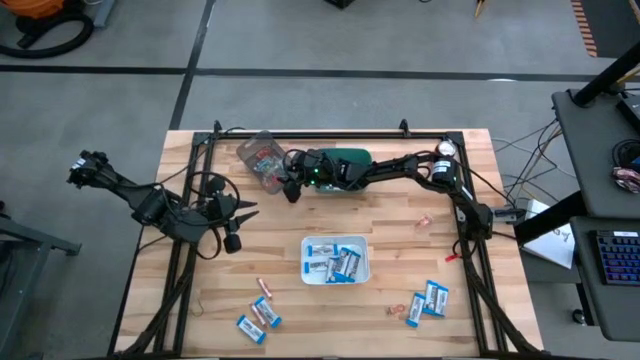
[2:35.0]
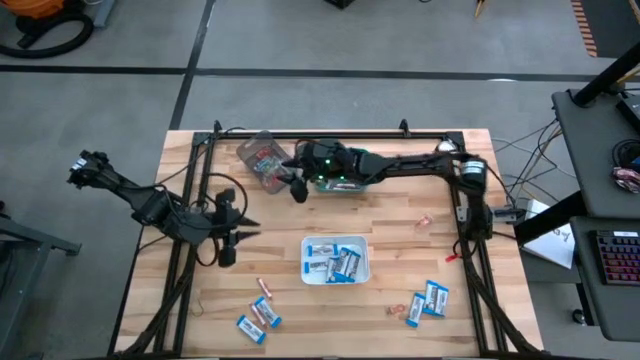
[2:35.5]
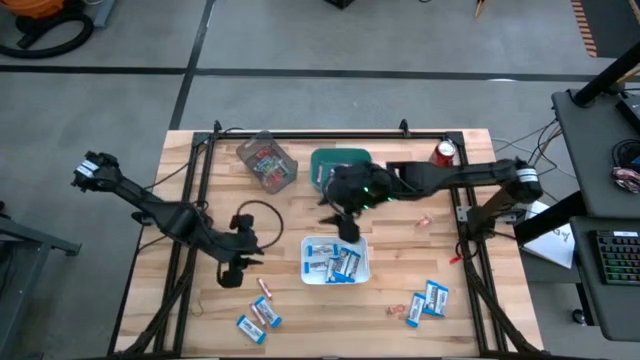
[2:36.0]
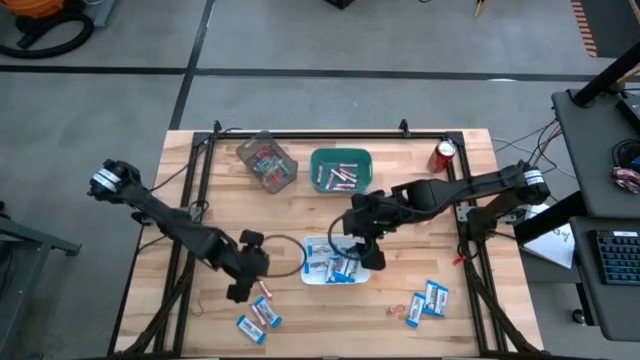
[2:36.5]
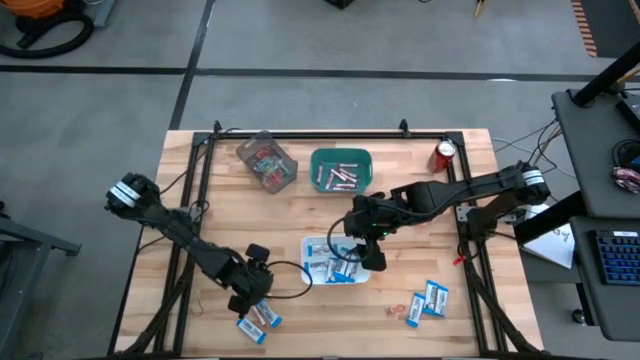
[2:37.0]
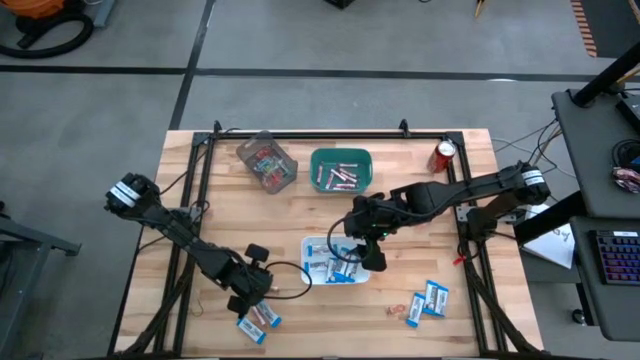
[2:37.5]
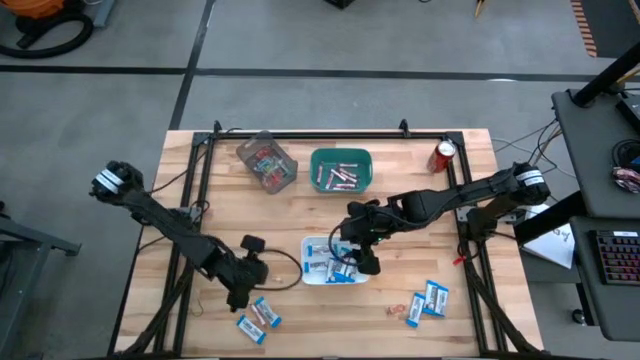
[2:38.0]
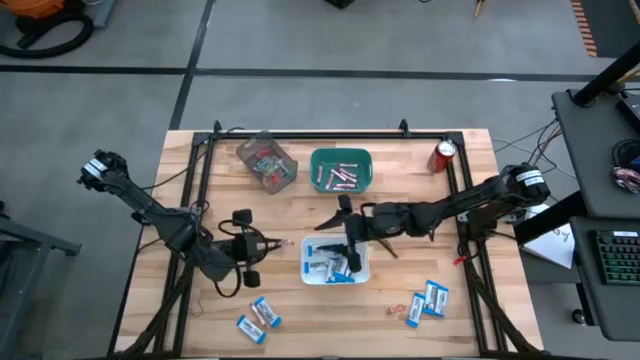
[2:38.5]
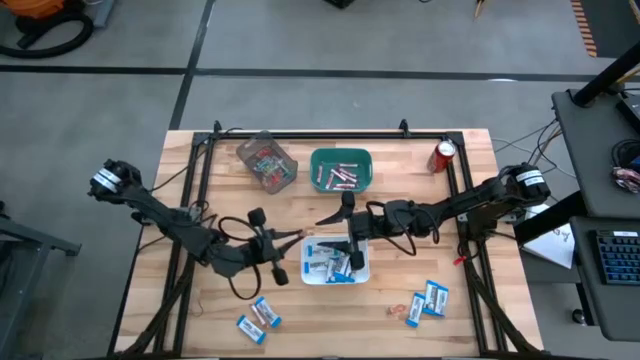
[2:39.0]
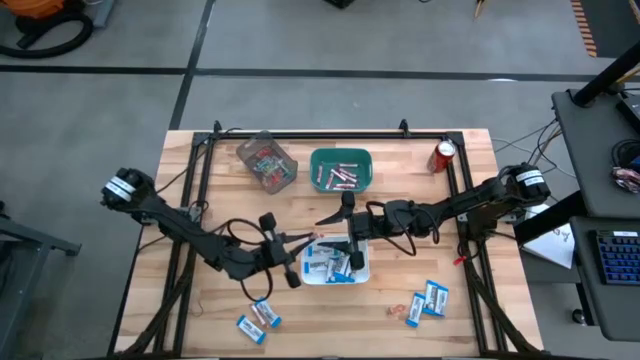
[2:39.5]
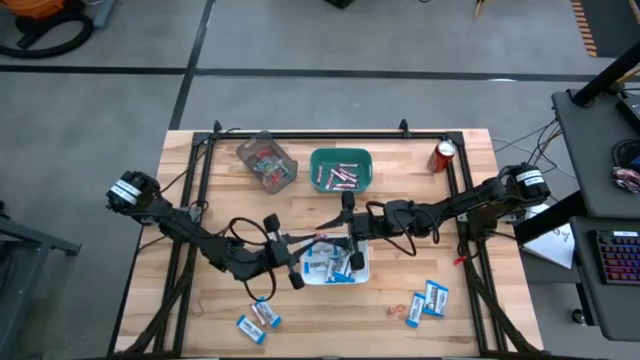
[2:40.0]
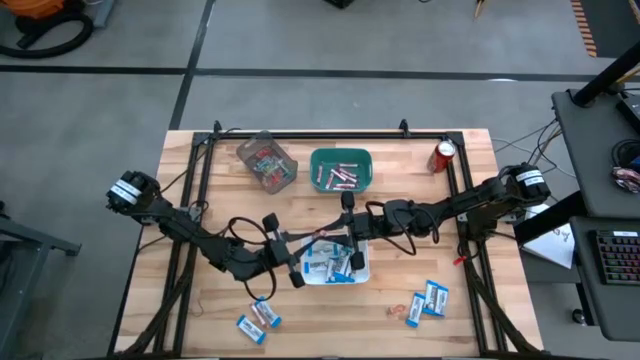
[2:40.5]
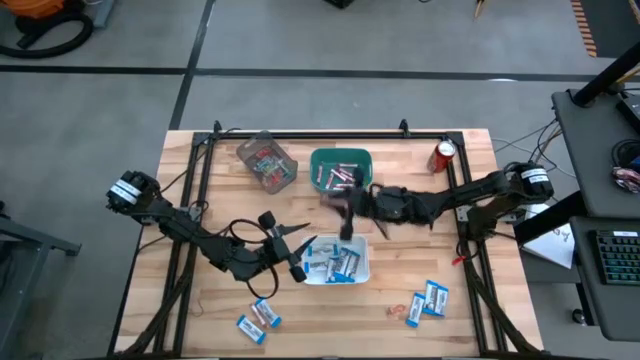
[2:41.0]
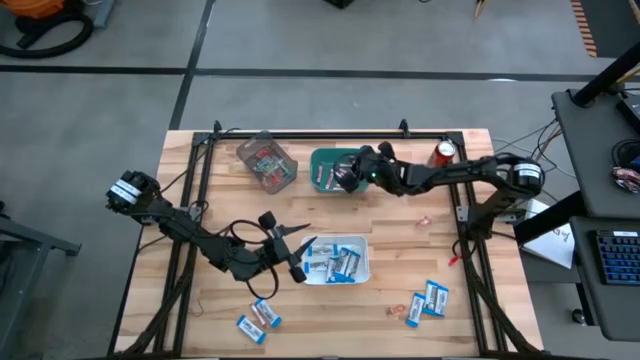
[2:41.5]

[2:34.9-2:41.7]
Task: Sort candy
Put the white candy into the green bin

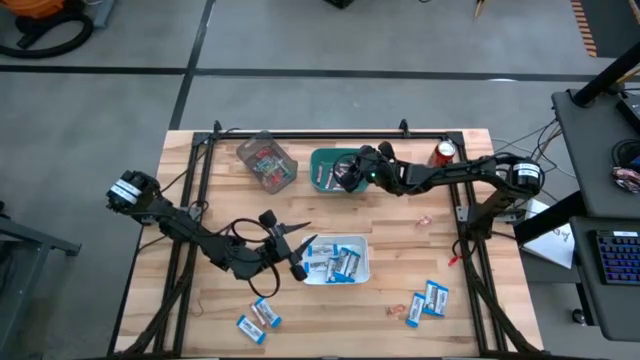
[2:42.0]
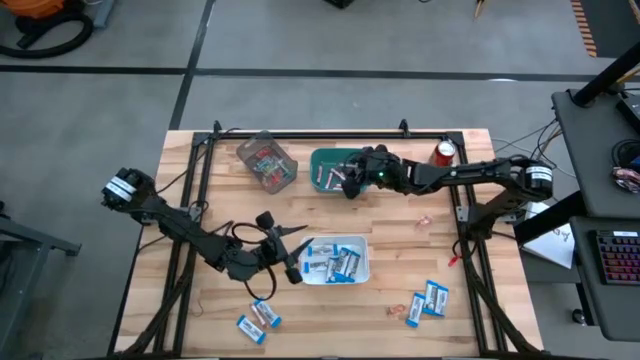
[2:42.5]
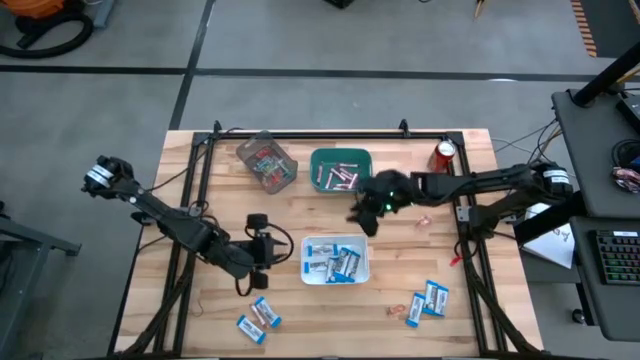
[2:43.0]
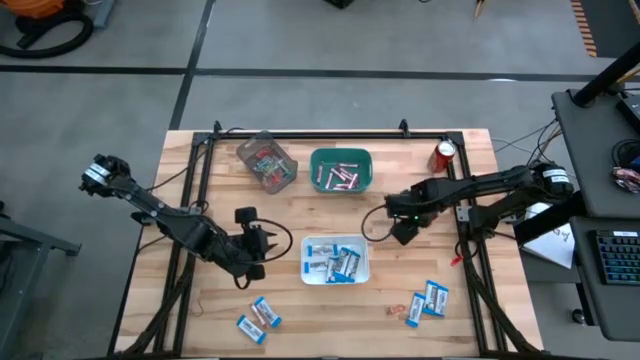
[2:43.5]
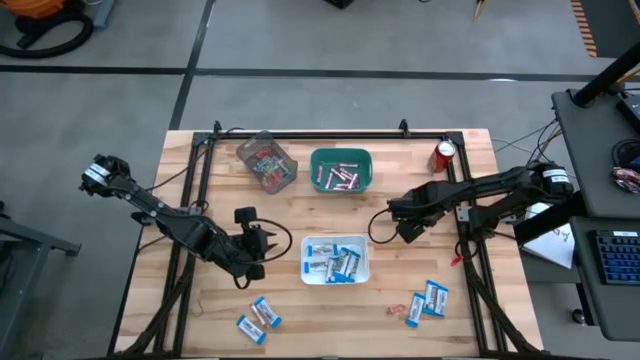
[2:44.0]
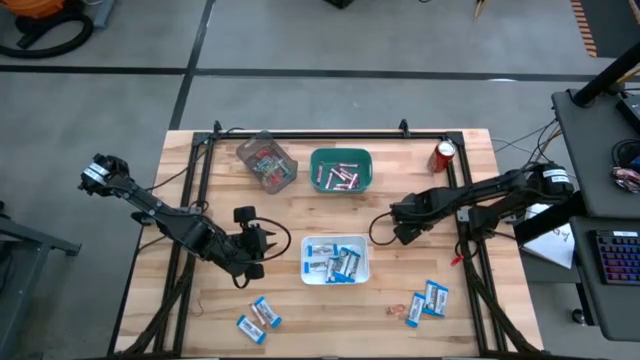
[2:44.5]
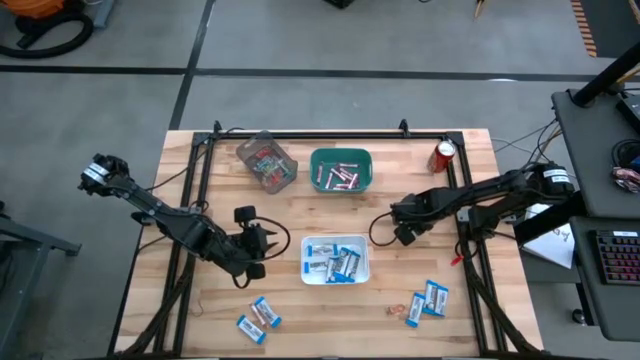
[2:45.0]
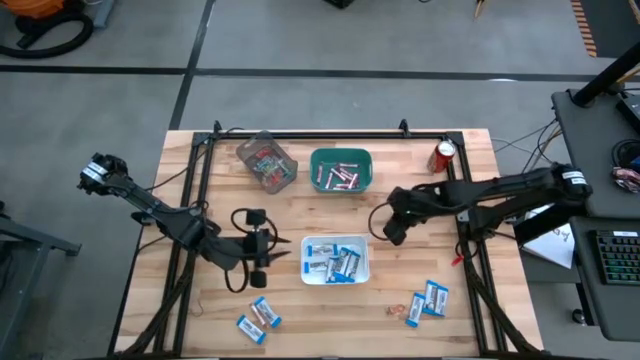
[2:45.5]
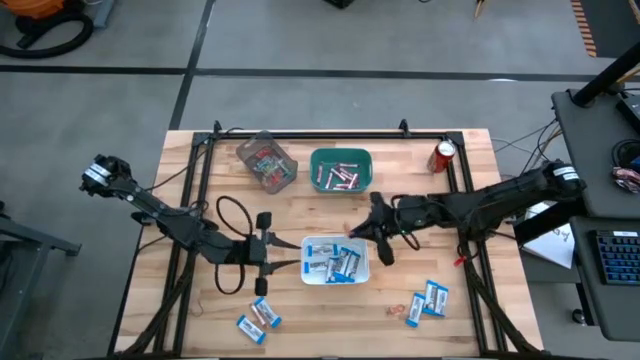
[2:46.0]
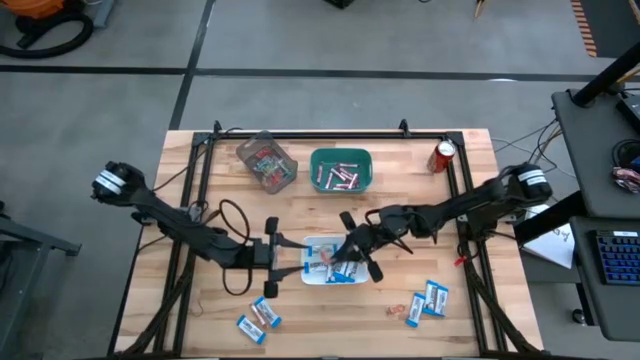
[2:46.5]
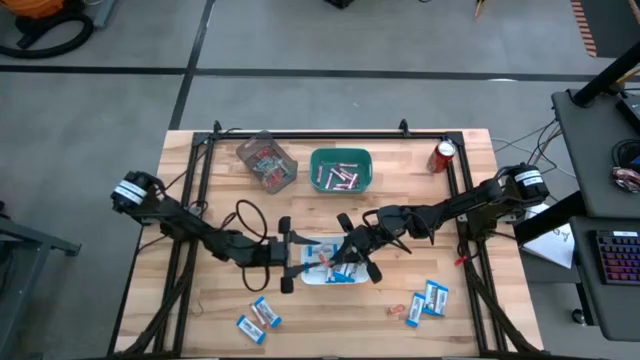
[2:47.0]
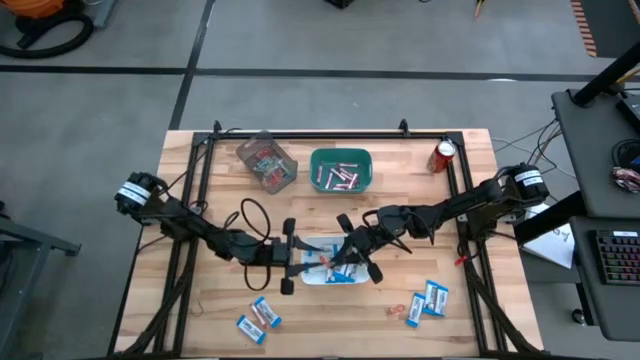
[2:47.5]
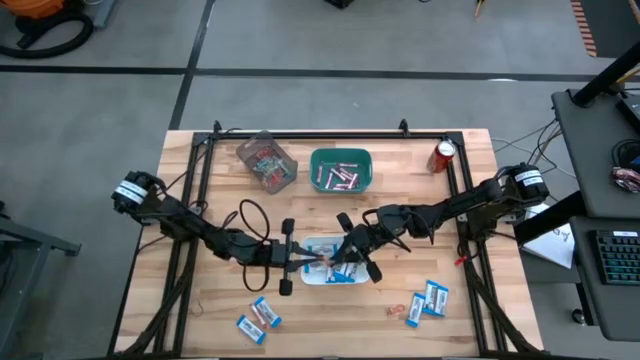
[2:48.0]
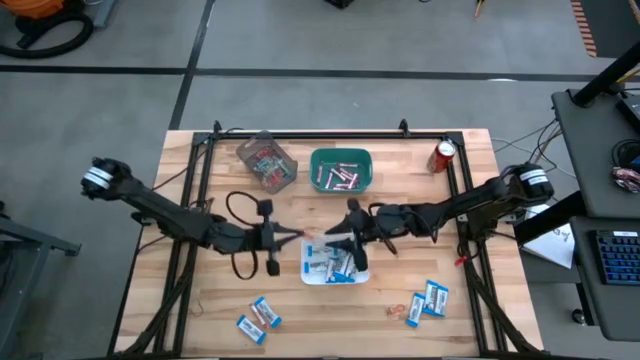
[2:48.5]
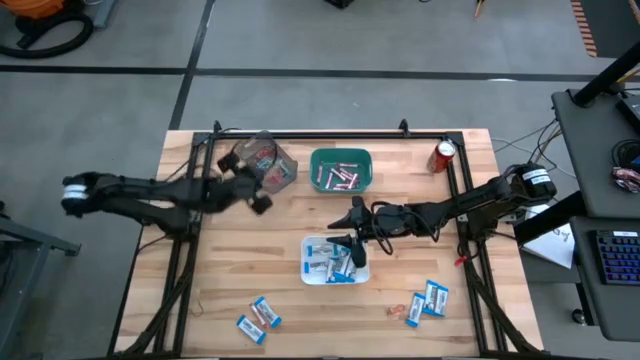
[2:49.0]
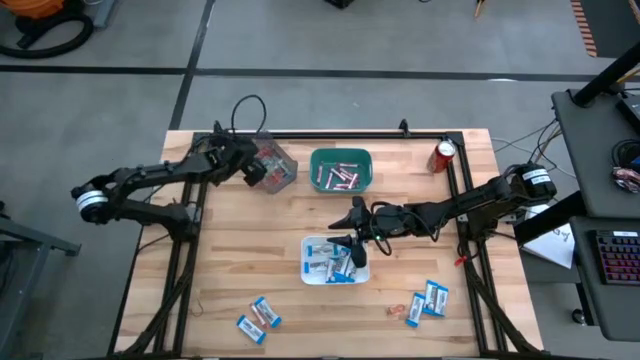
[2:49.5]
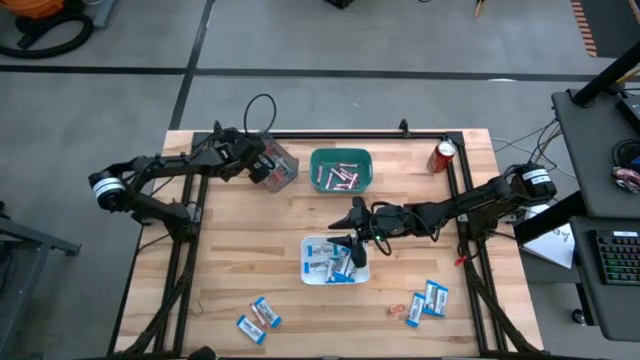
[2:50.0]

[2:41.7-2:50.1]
Put the orange gummy into the black bin

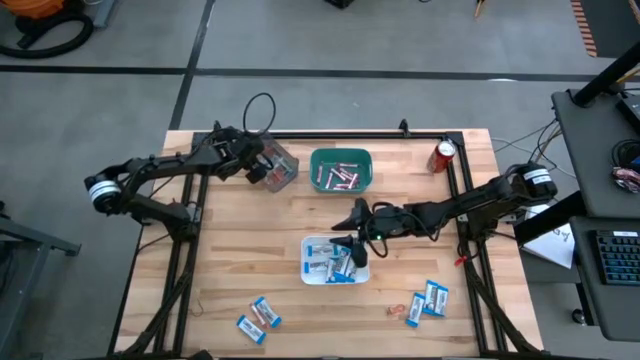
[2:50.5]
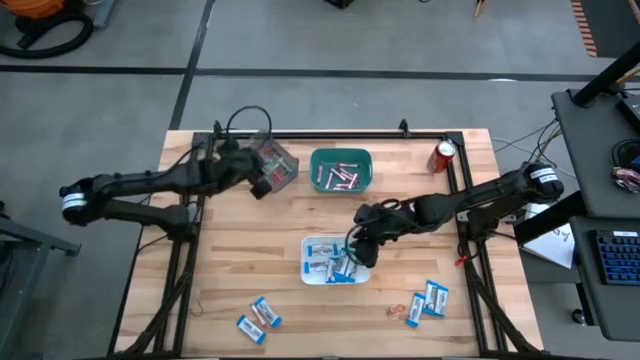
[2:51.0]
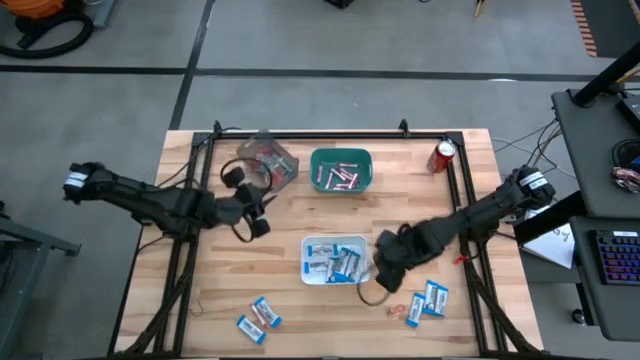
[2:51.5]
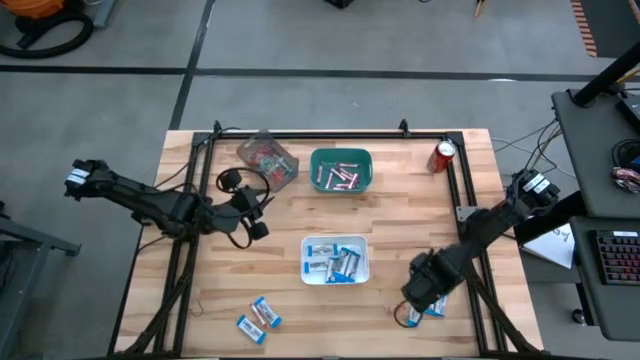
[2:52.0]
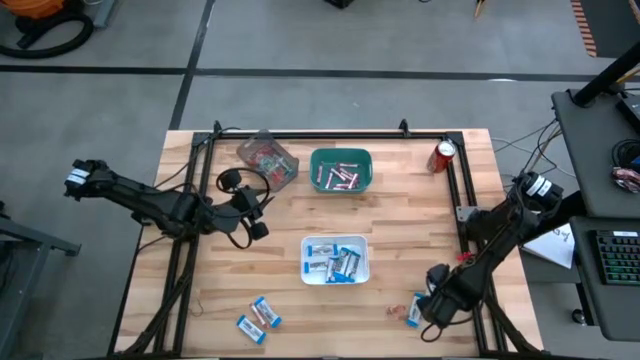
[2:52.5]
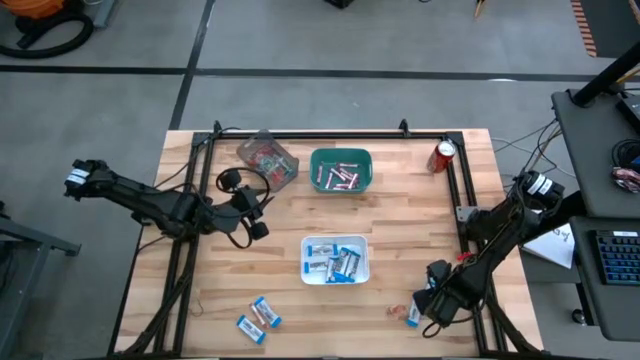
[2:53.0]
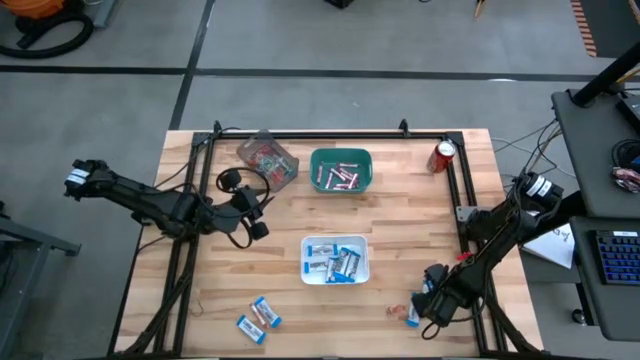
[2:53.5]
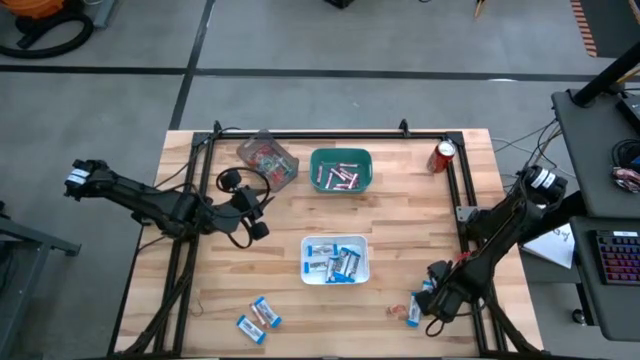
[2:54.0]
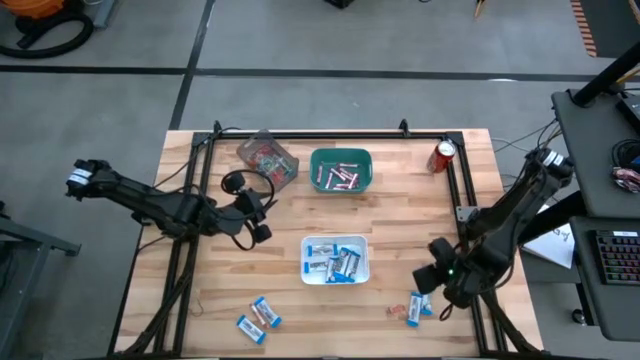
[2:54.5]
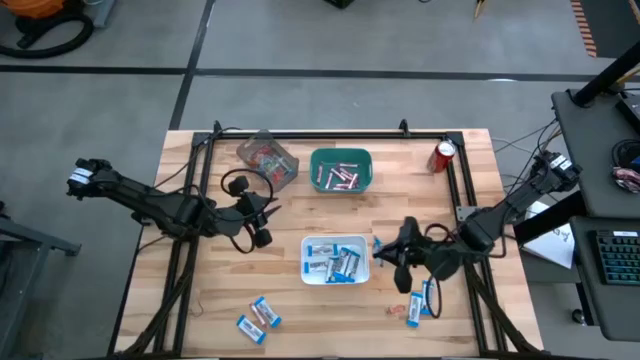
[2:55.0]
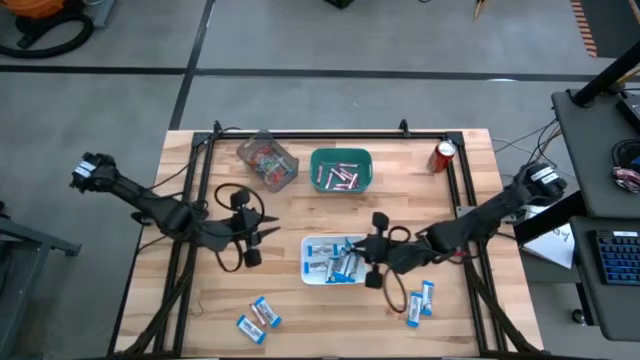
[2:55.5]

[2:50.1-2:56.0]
Put the white chocolate bar into the white bin
